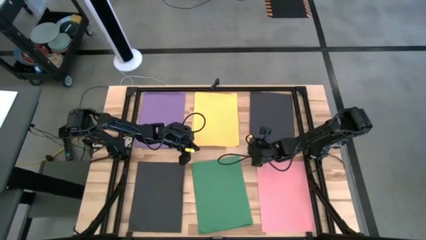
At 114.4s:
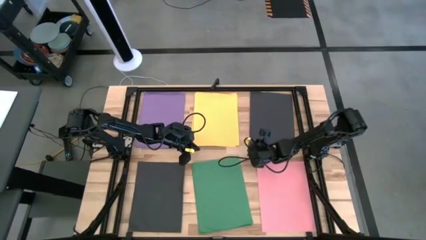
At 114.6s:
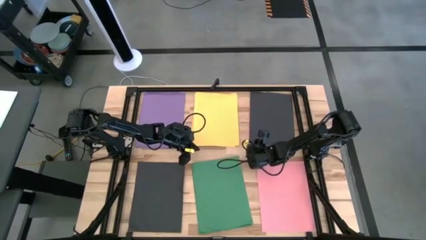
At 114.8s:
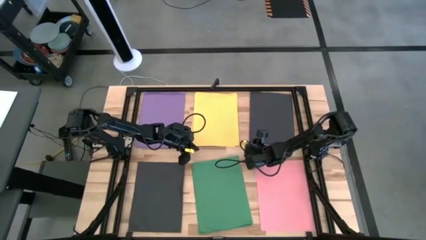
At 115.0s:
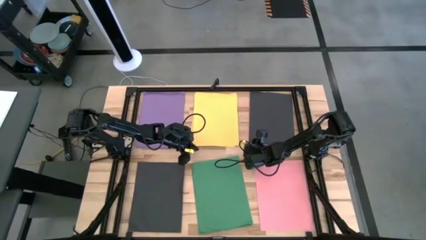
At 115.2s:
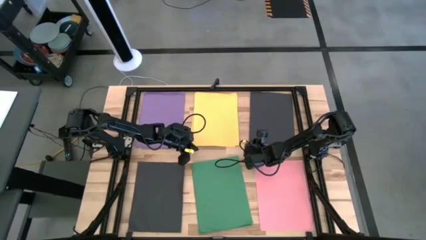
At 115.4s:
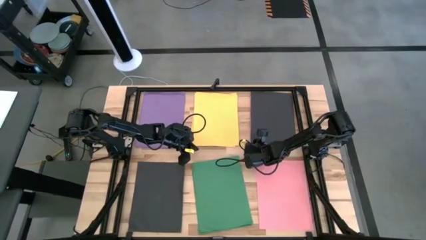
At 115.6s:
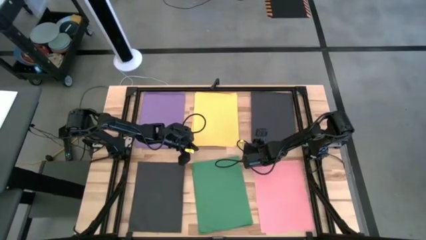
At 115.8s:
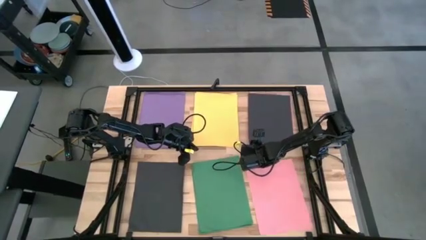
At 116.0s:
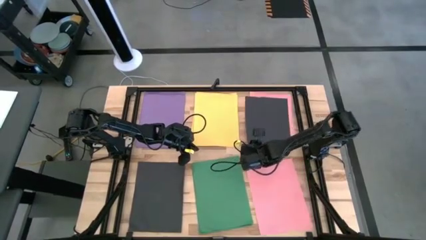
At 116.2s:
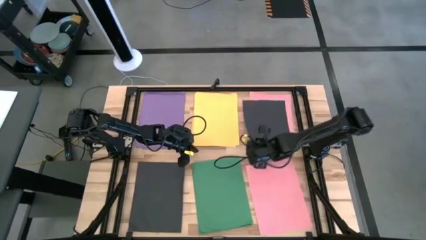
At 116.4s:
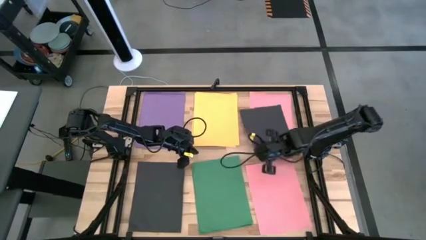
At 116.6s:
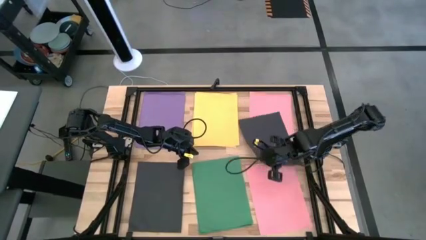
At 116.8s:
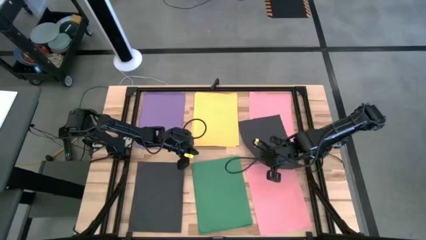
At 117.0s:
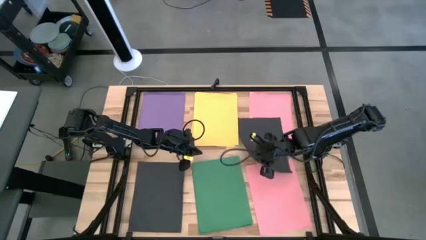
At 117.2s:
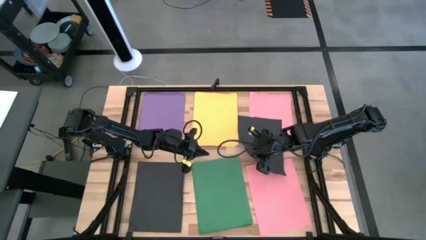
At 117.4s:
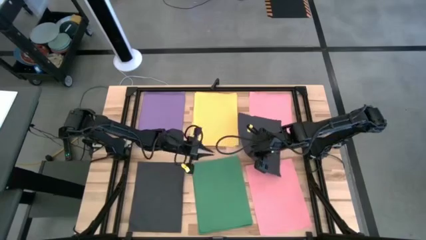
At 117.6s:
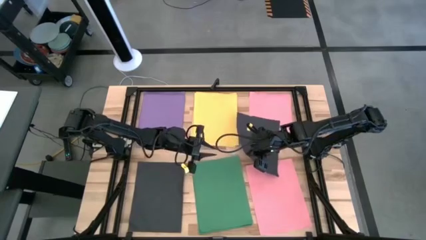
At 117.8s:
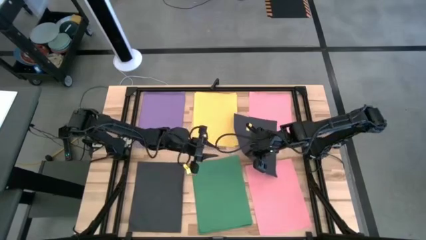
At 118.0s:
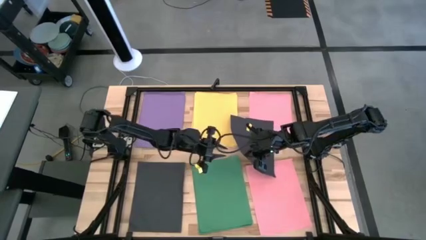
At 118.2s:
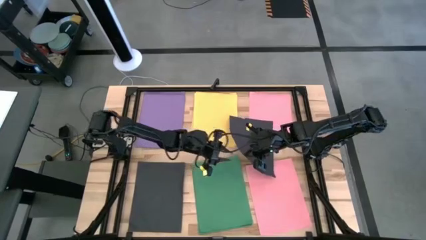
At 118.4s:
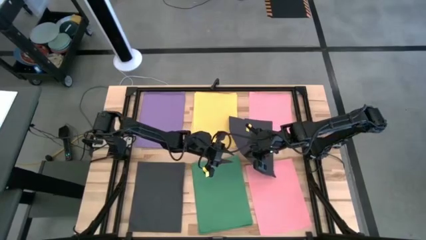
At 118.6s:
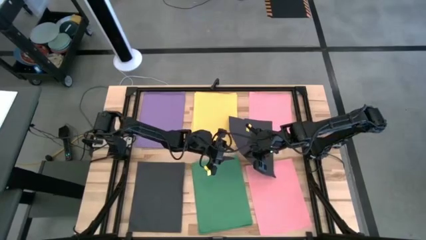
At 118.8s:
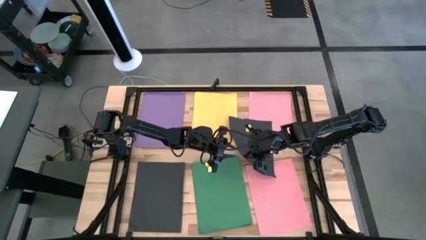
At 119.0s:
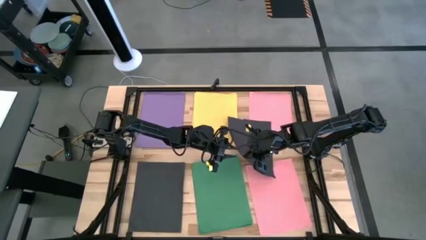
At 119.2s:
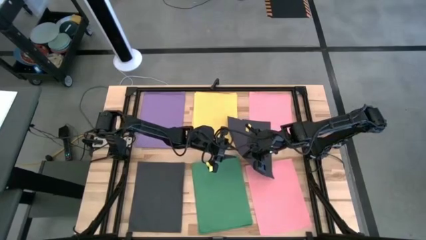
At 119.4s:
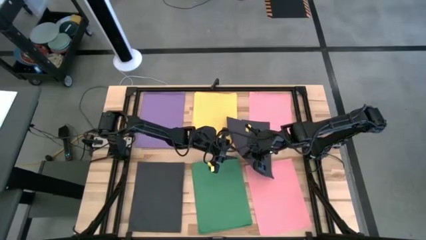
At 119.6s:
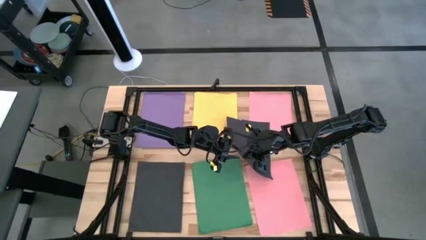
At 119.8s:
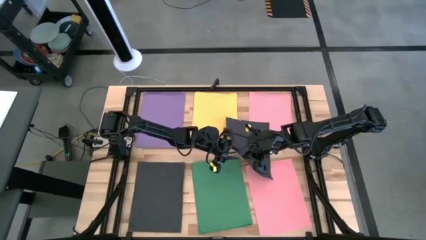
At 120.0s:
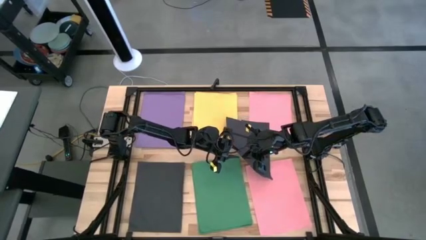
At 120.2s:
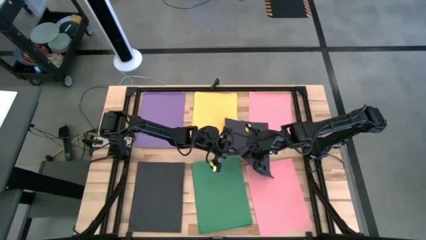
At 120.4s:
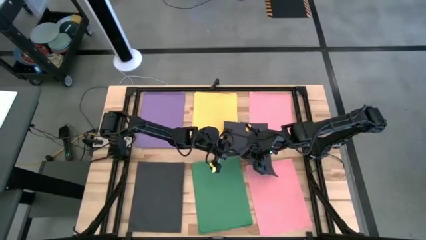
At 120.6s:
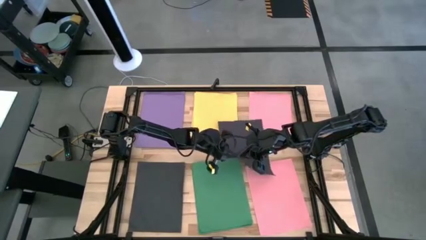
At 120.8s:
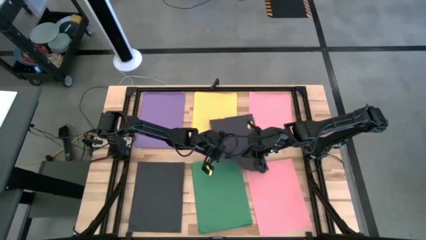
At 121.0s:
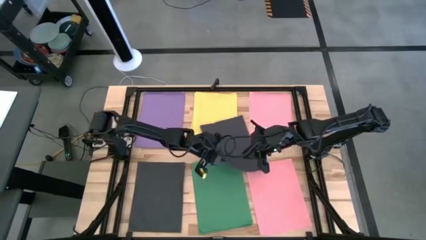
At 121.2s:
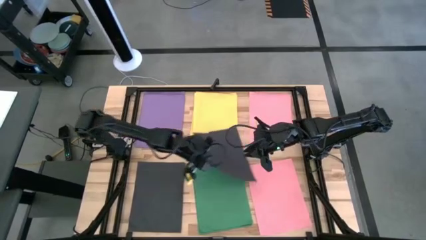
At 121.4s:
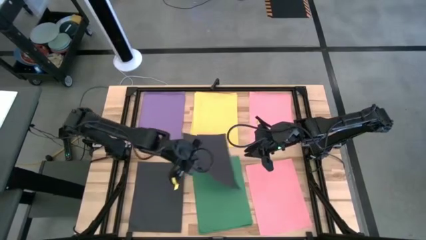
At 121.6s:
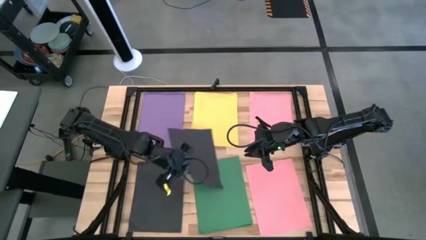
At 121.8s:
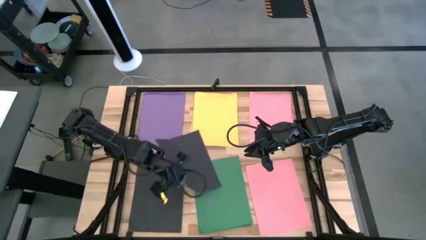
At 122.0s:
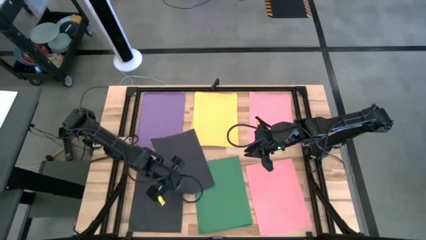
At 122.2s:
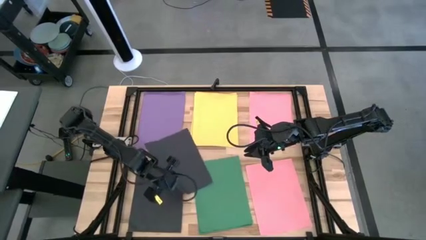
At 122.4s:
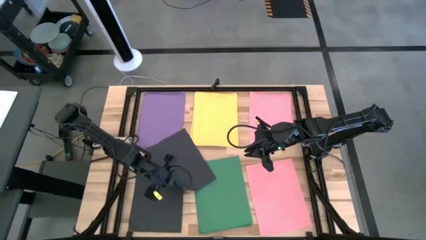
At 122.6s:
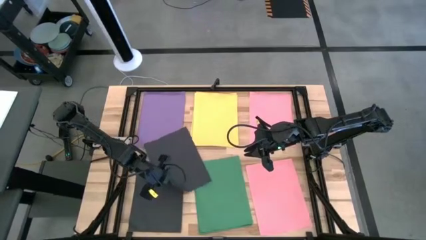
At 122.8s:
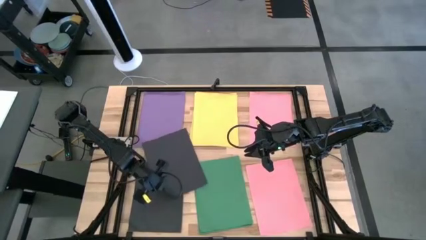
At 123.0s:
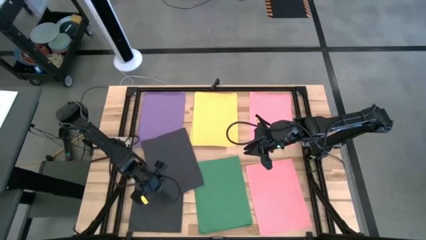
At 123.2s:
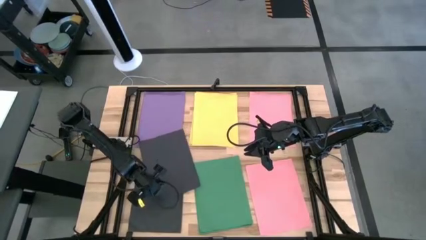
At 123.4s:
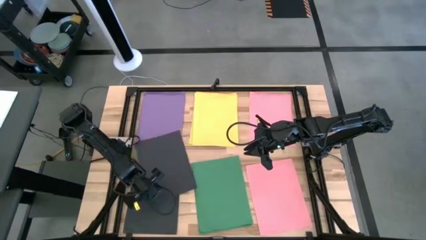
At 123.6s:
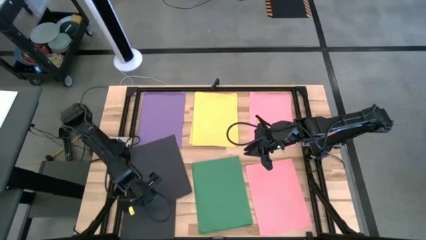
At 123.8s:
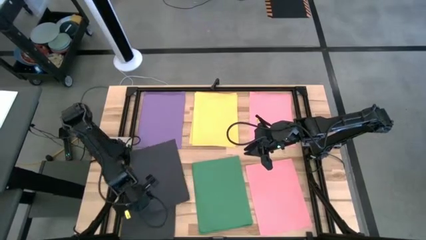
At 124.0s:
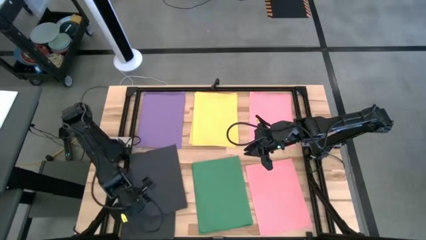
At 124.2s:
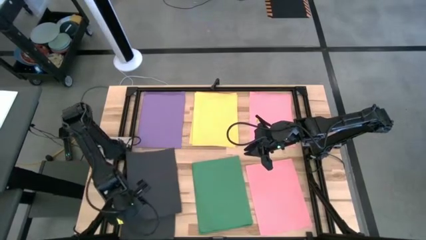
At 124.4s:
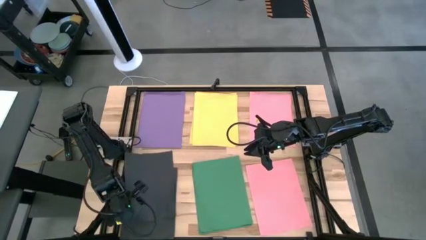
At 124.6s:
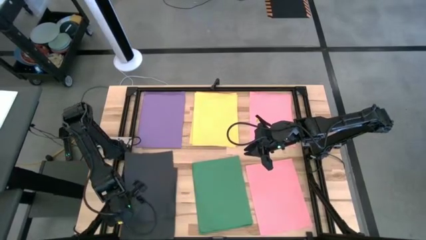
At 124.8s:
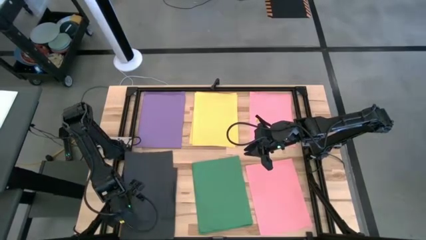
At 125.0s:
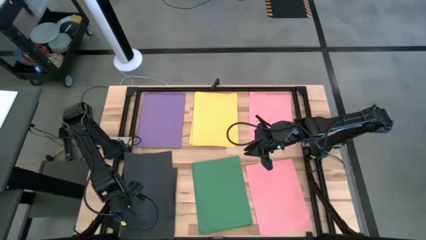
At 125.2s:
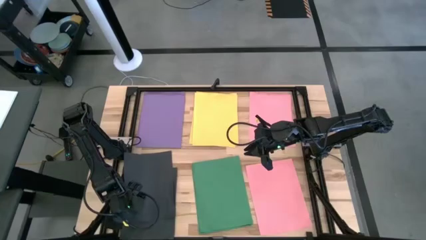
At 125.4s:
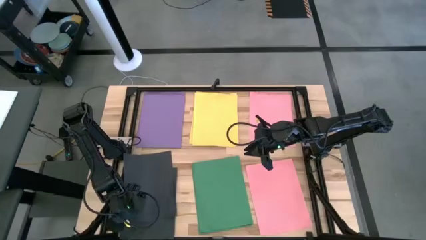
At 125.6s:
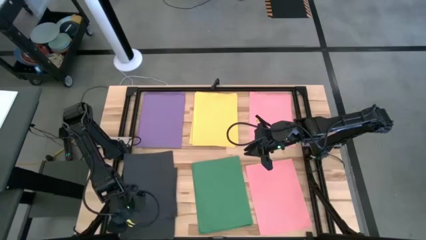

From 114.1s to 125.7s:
Task: Organize paper
Stack the black paper on top of the black paper

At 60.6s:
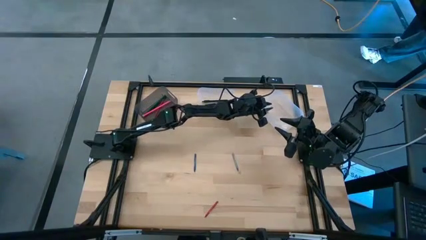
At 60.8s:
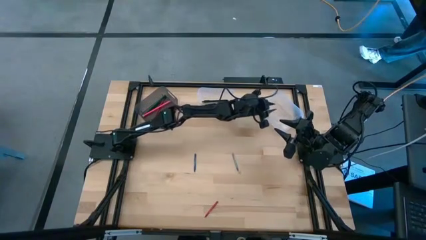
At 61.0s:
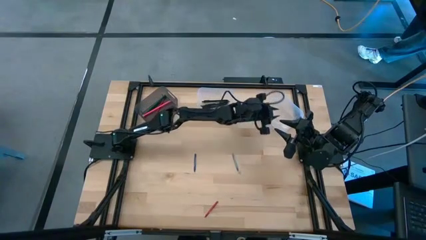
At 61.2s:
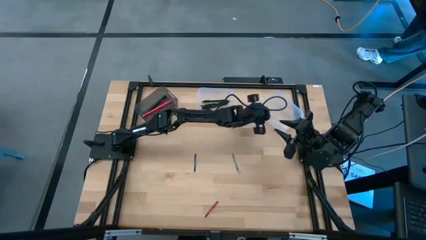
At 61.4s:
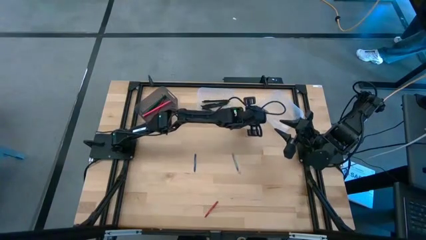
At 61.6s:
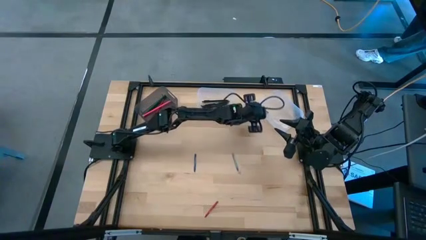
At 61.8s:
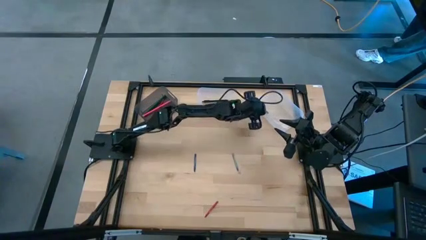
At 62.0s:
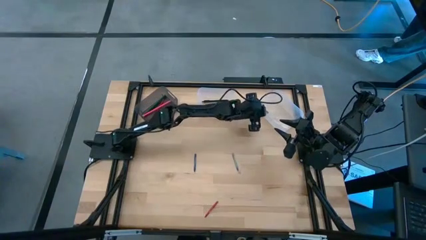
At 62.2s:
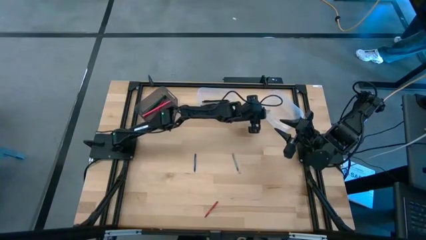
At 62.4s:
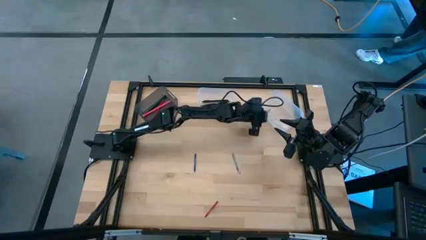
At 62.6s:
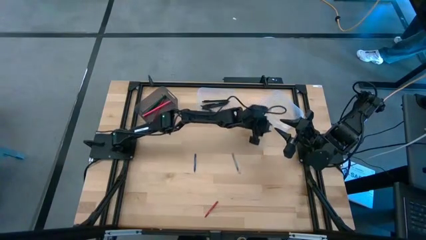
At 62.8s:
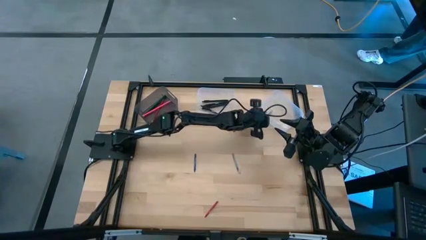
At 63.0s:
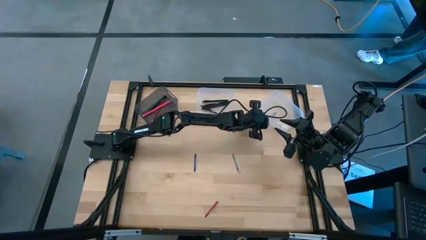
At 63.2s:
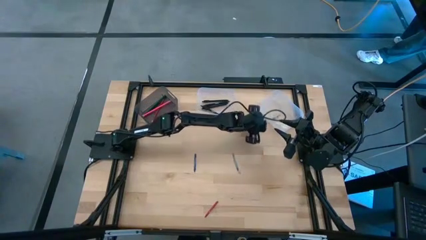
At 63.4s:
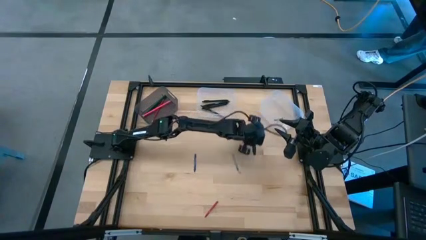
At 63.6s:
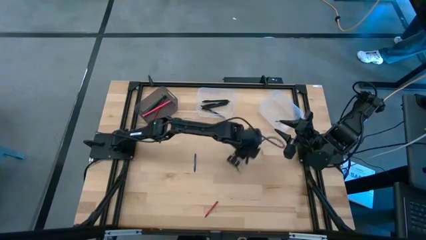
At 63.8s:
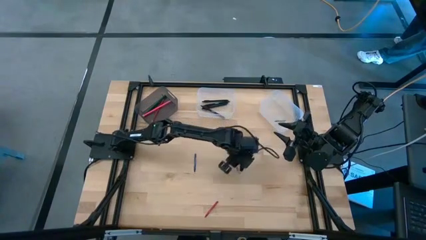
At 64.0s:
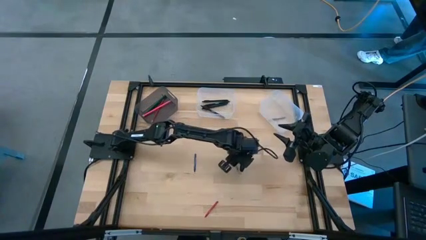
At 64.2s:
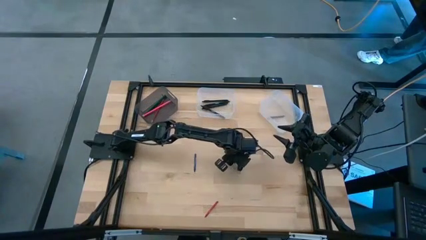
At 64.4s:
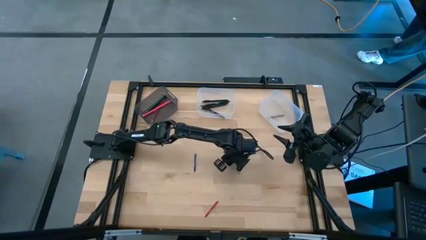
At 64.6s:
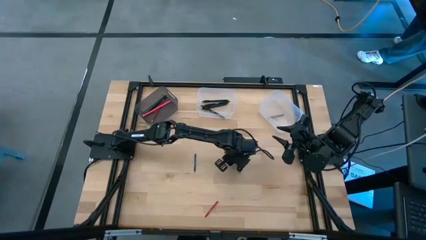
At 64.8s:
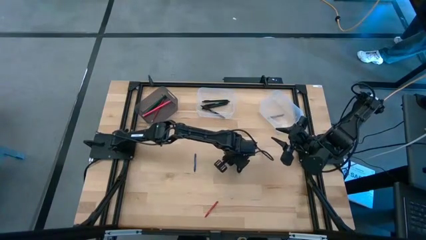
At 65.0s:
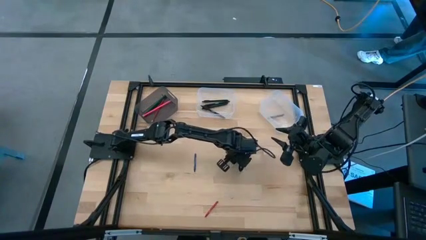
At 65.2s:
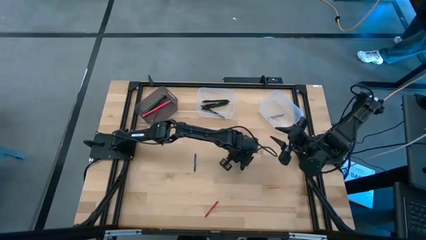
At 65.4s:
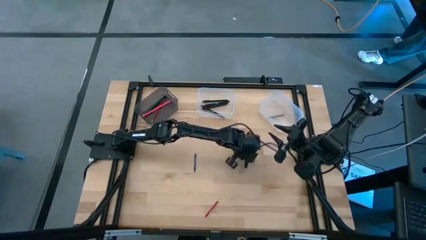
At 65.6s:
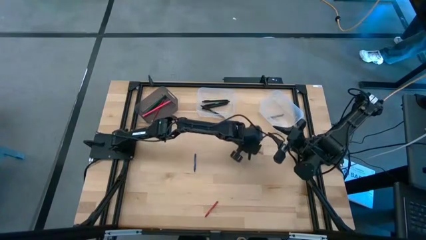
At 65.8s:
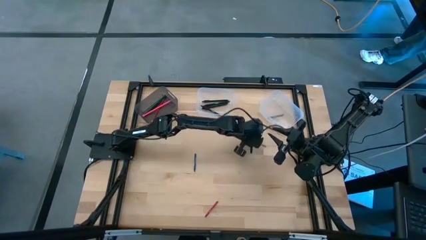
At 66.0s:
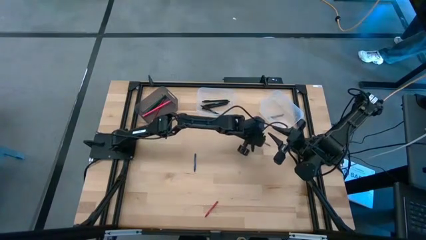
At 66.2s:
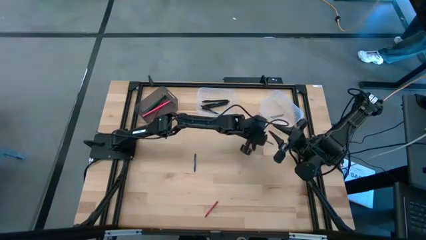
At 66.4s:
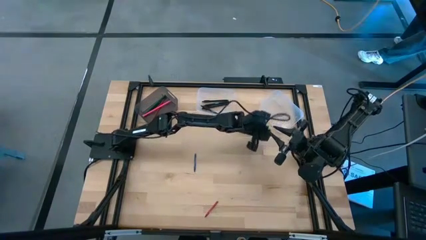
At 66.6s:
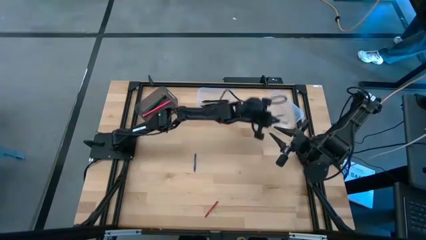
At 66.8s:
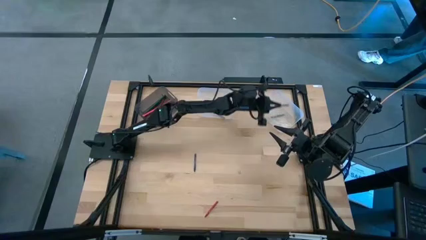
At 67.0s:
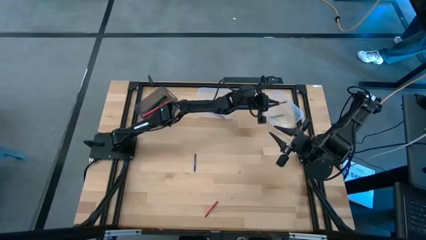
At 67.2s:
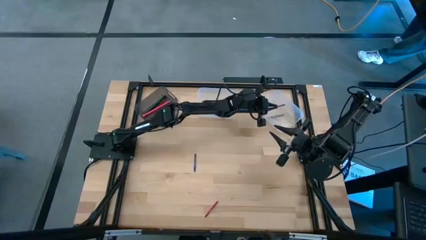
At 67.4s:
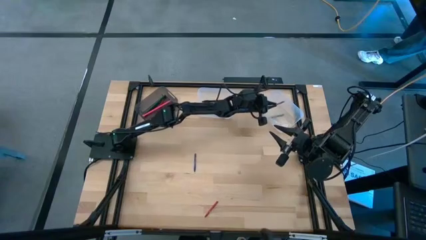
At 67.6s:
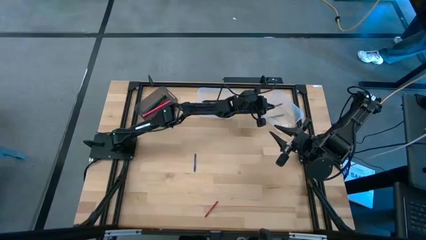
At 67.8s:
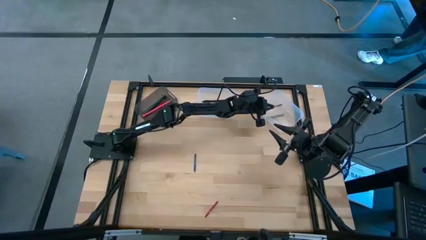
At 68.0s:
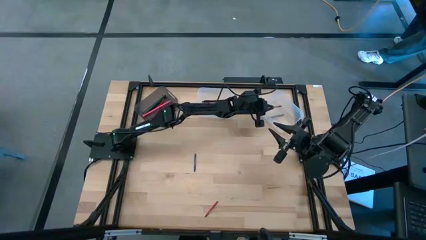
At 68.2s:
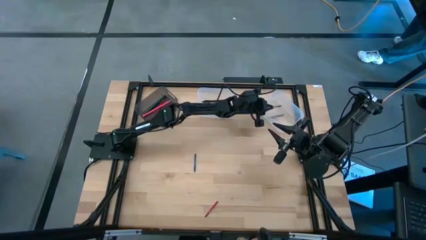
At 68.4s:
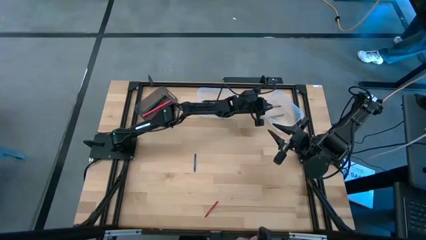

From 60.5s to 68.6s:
Task: Sort crayons/erasers/pens/pencils in bins
Put the gray crayon into the right transparent bin
